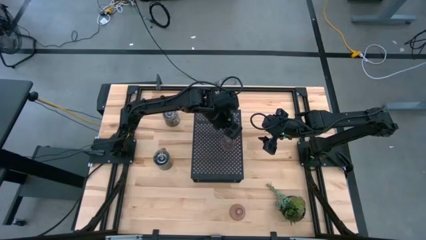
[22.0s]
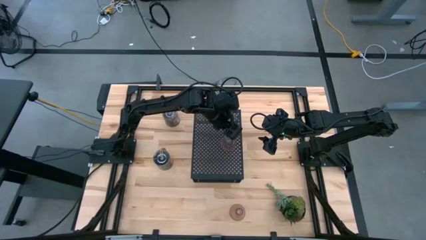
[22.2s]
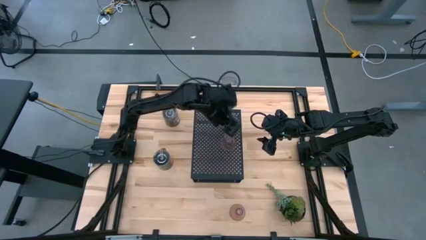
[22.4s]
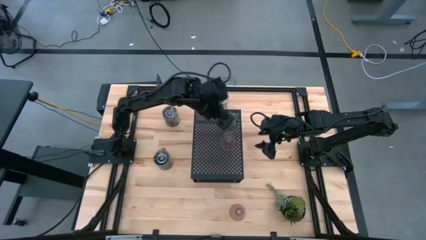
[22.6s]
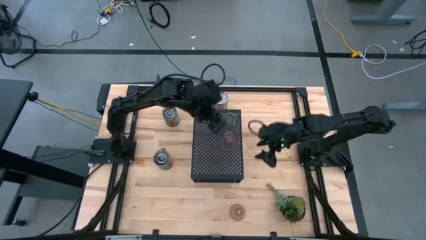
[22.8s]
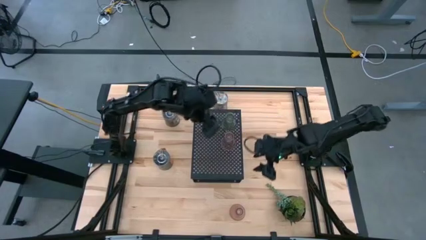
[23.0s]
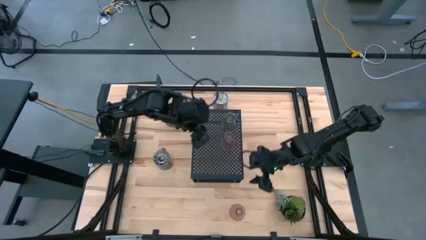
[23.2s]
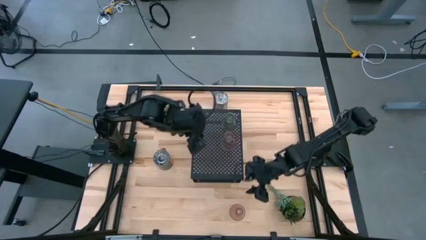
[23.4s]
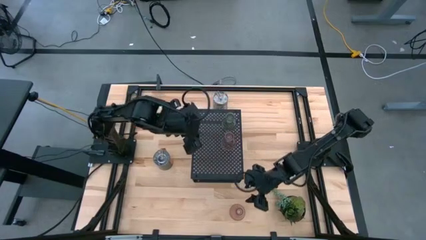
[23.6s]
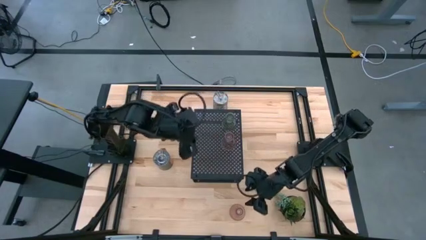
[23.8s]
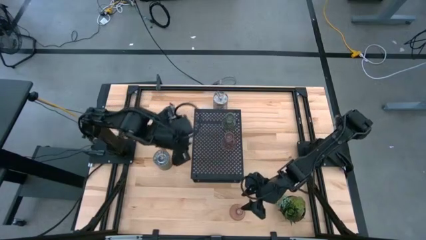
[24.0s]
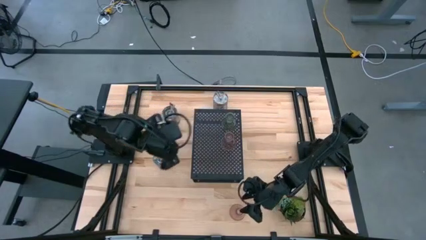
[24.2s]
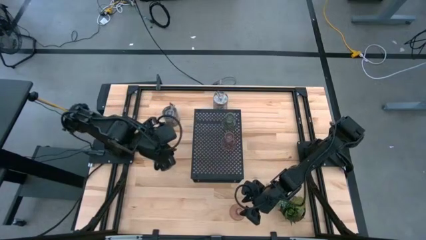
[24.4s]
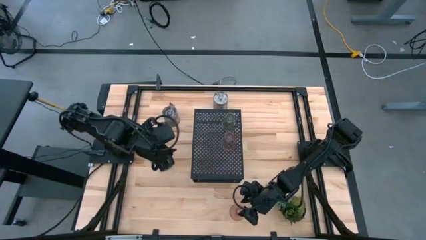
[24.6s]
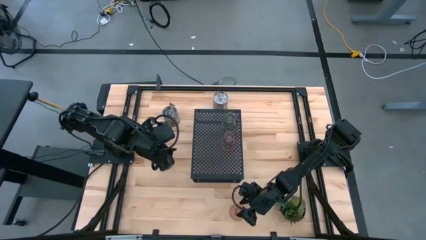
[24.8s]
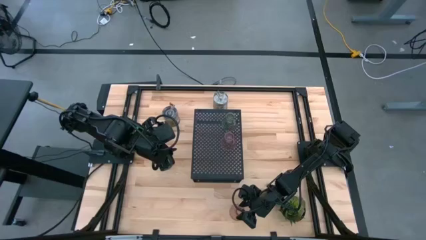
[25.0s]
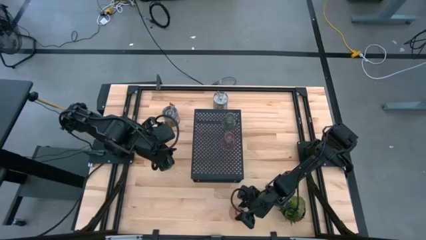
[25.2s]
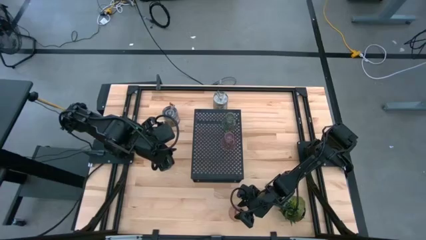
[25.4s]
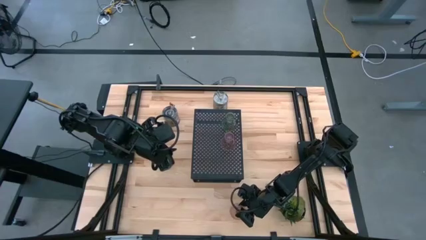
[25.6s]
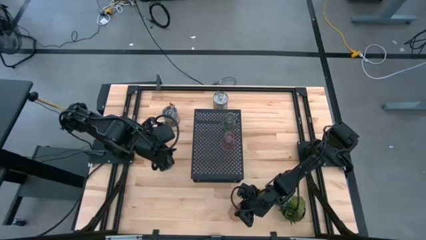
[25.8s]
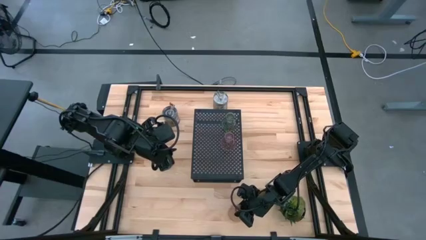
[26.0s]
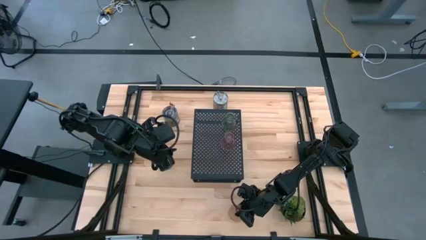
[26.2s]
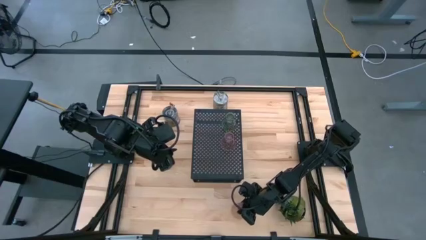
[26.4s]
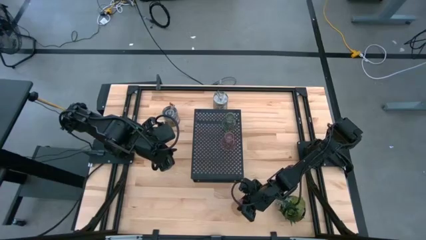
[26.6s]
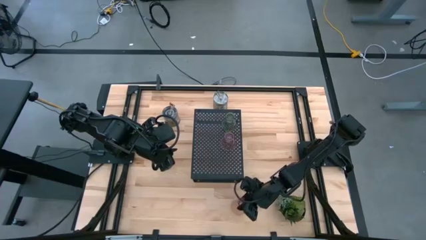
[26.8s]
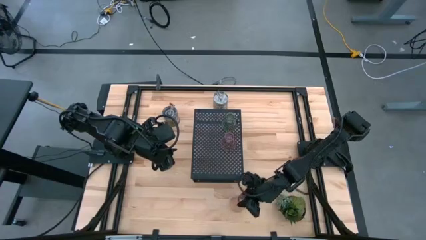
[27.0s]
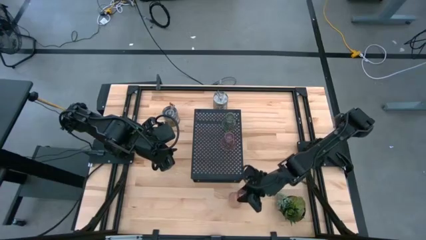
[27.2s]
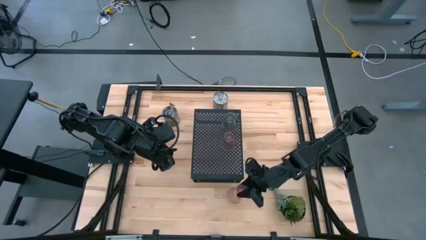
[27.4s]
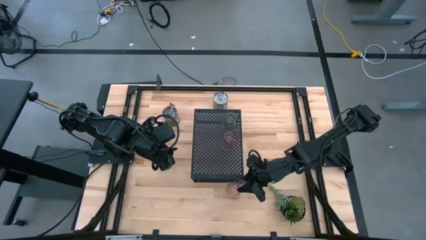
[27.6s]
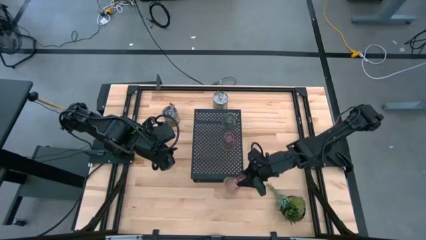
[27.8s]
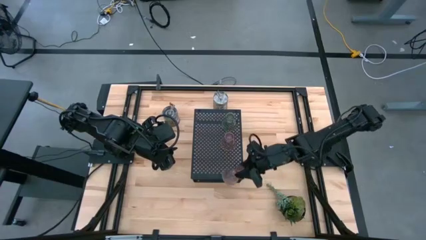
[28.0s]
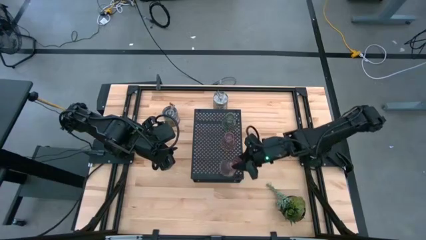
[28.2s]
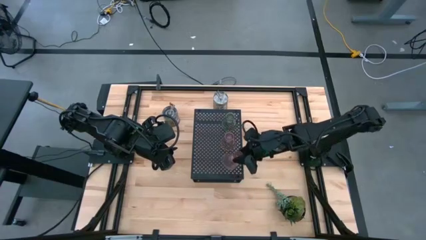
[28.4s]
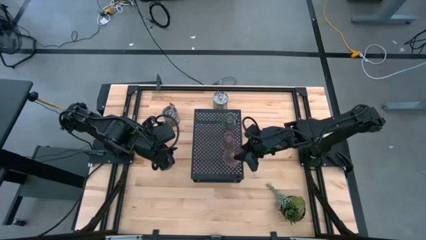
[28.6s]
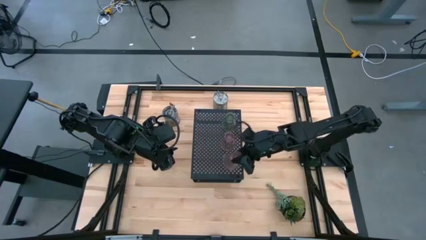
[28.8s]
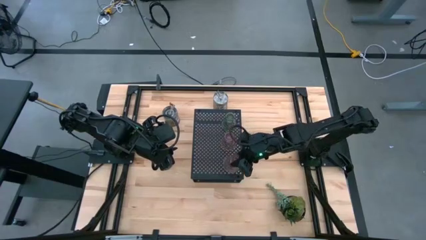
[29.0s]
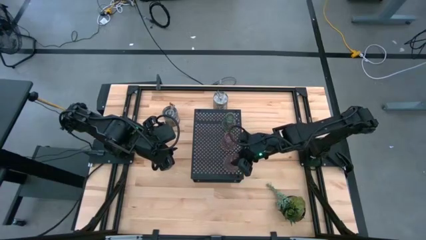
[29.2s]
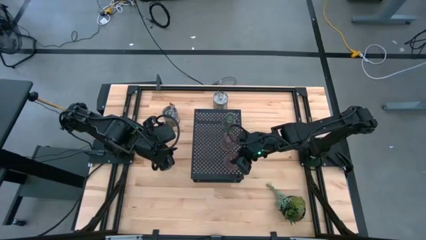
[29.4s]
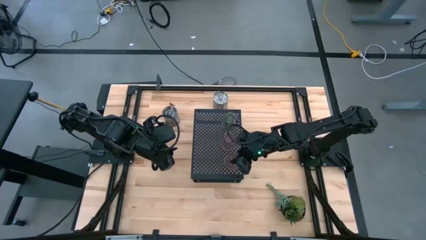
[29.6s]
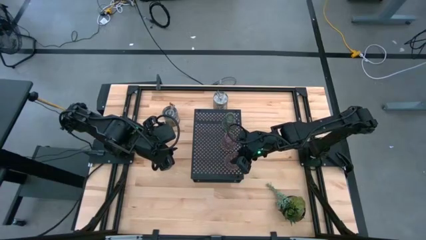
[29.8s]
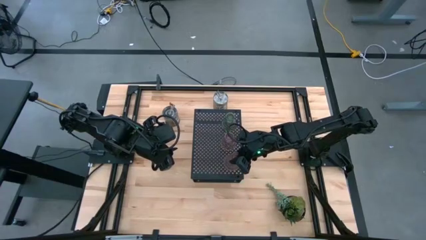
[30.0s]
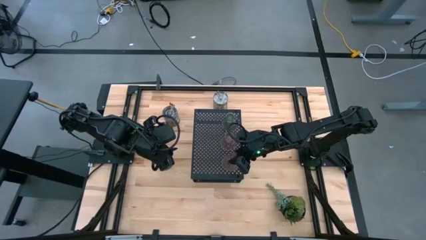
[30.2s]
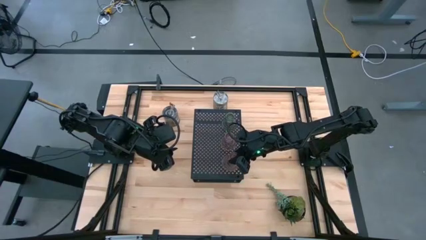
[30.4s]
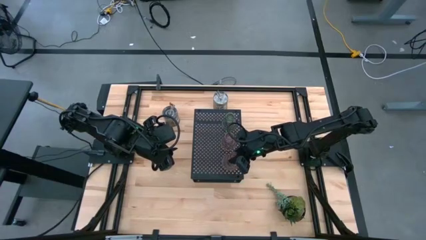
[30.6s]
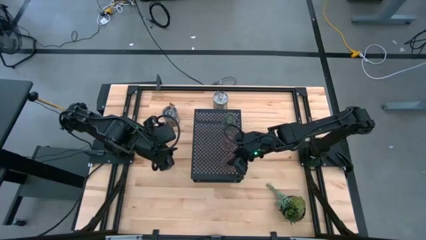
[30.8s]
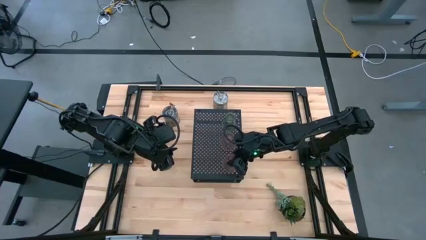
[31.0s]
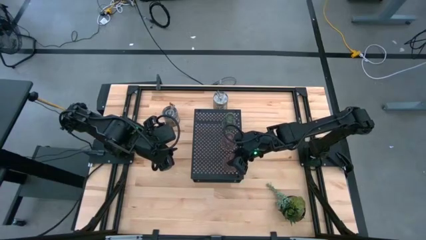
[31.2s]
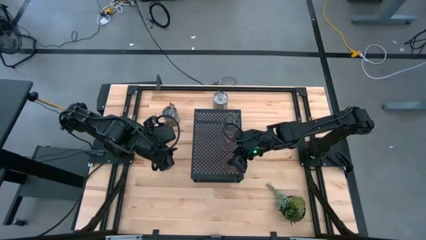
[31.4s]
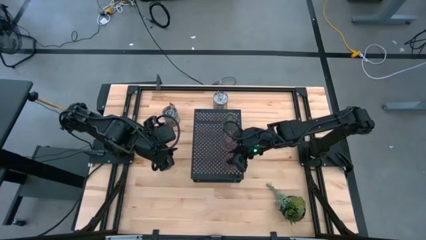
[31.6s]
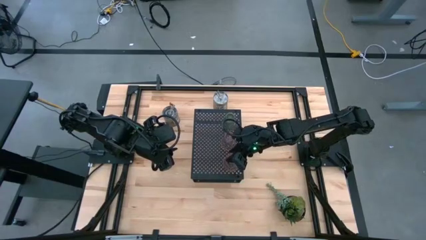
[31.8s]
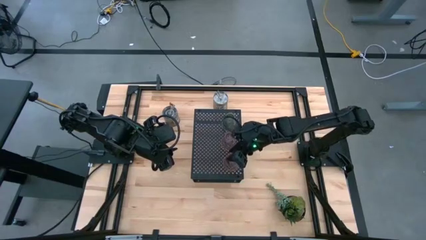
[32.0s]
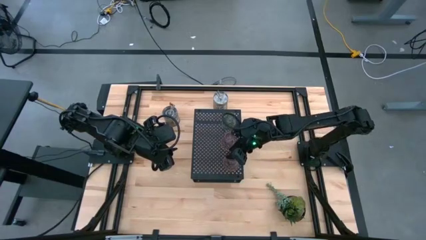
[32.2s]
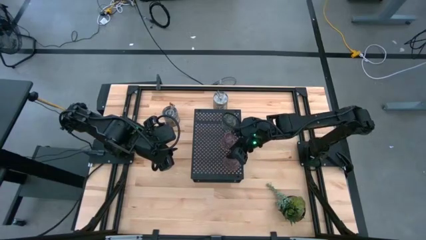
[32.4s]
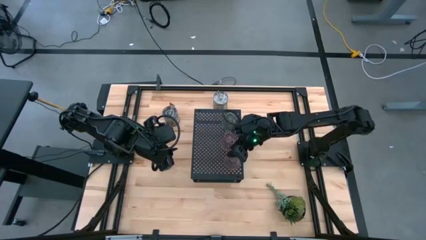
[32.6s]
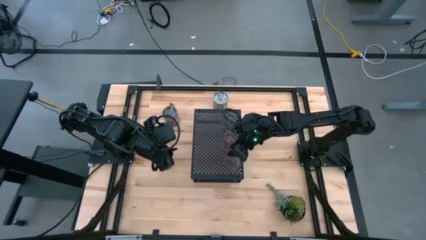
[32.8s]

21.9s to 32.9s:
Task: Pick & Place candle stick holders
Put the pink glass candle holder on the shelf aligned with the pink glass candle holder

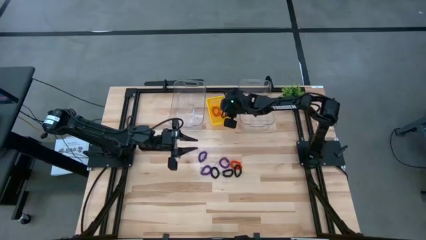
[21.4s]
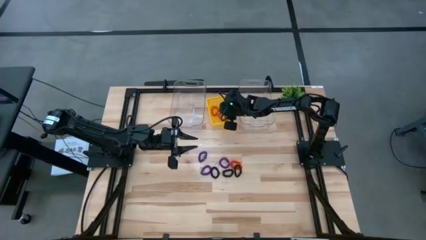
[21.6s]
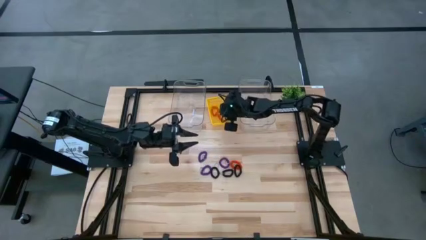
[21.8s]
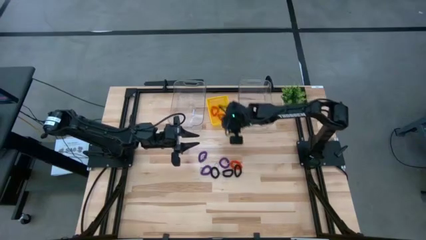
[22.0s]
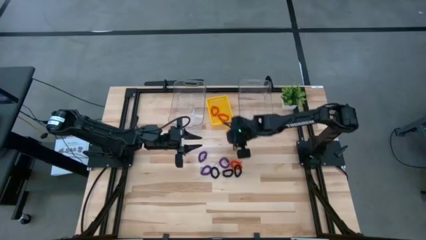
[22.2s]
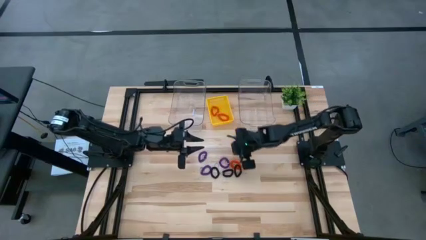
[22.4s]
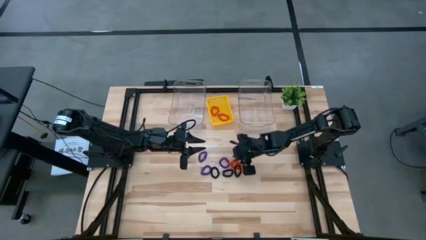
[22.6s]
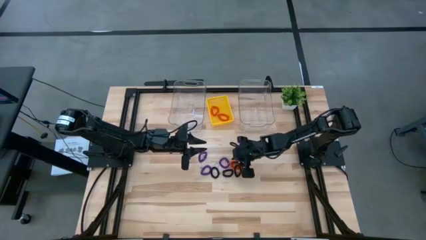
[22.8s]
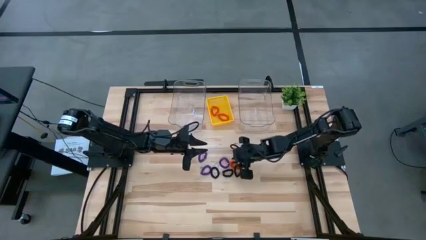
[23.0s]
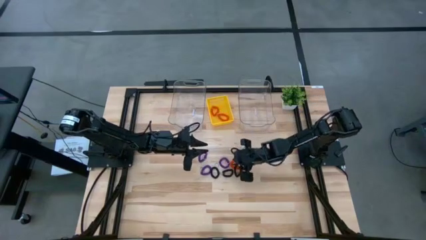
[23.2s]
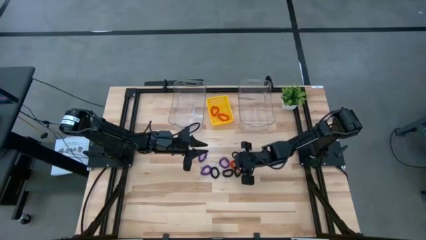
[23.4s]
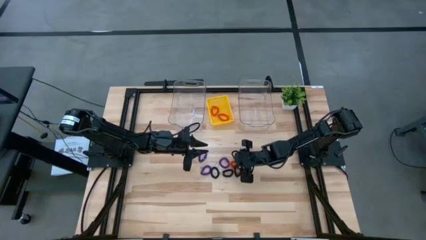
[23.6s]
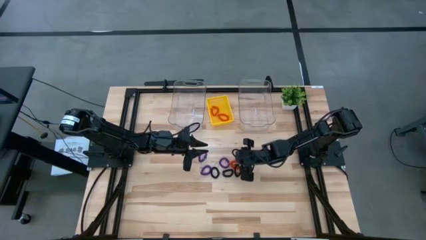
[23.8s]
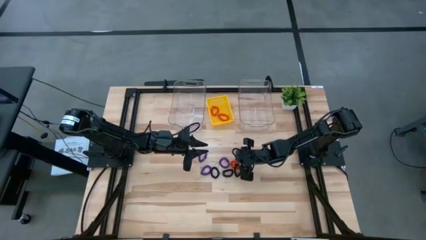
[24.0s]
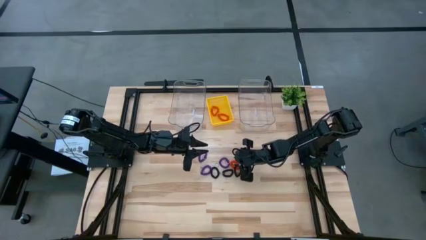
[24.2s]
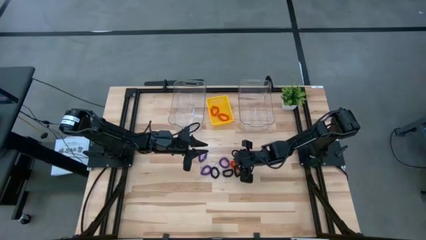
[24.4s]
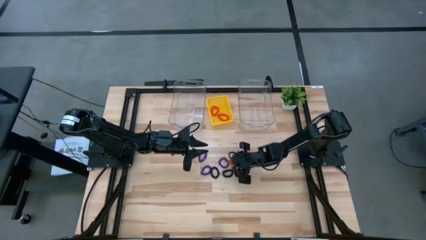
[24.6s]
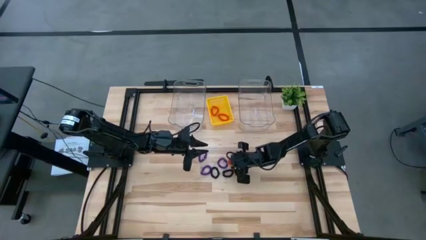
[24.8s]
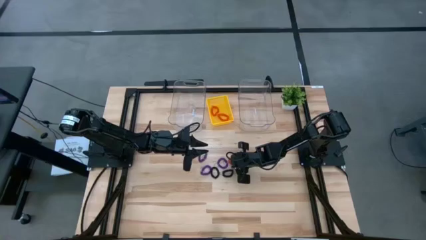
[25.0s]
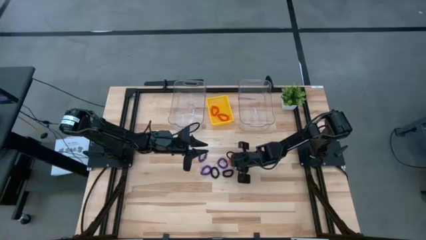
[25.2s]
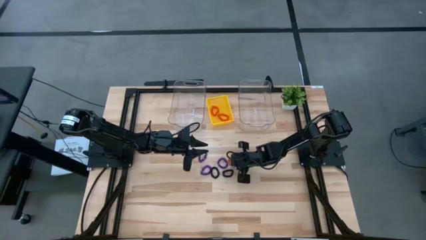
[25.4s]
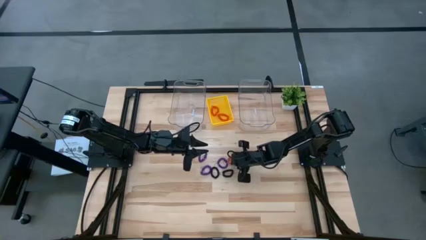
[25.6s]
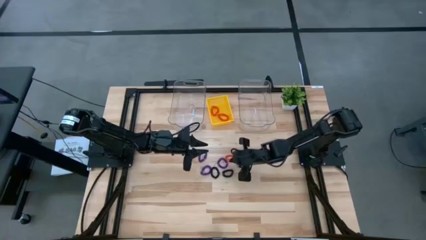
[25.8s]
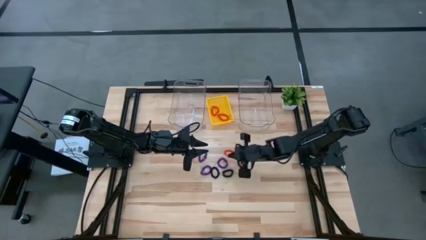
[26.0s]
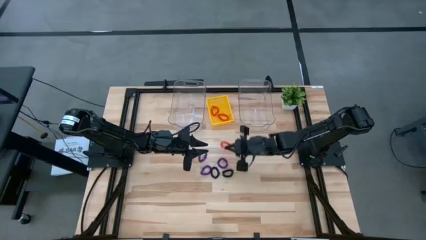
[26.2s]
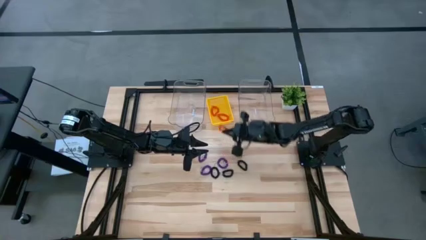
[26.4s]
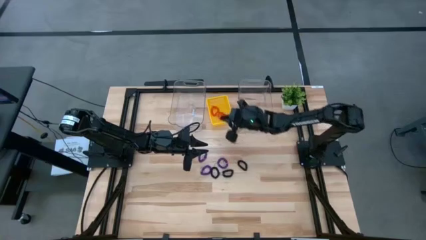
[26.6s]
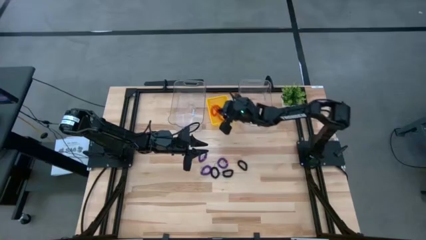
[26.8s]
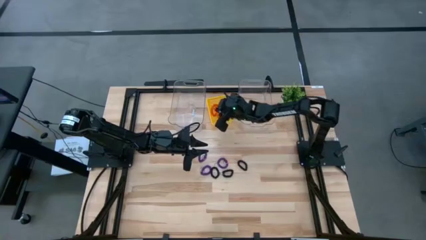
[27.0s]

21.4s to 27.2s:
Task: Sort spring keychains
Put the orange spring keychain into the yellow bin
